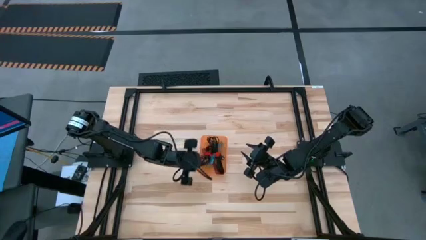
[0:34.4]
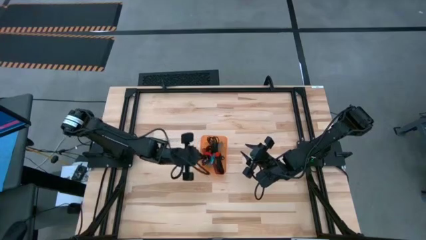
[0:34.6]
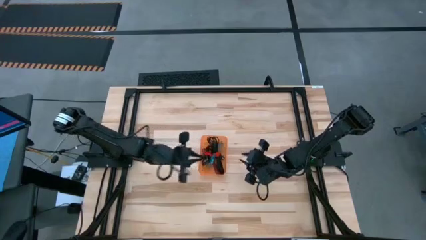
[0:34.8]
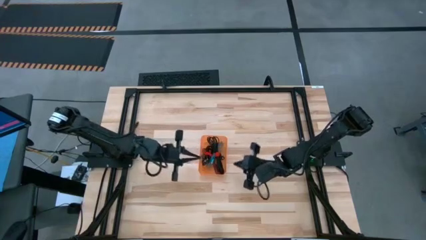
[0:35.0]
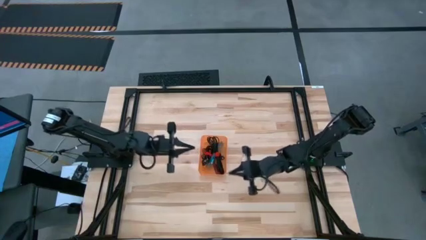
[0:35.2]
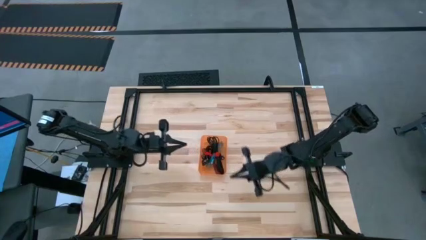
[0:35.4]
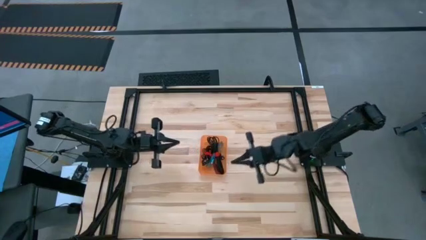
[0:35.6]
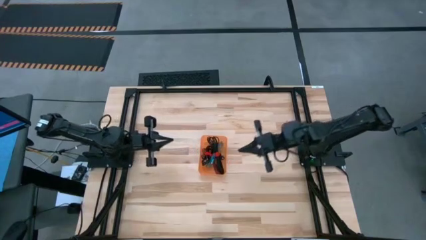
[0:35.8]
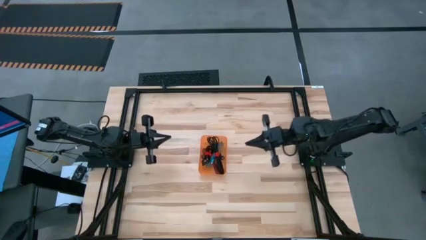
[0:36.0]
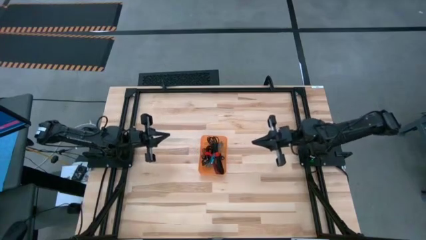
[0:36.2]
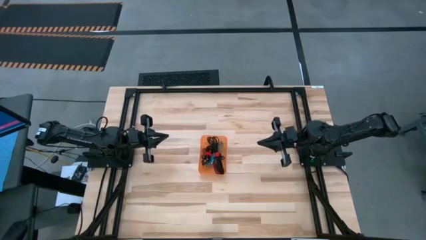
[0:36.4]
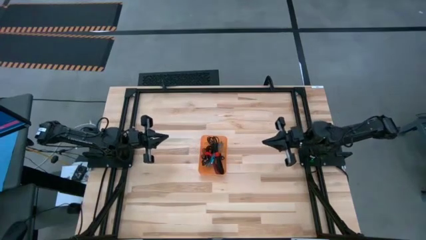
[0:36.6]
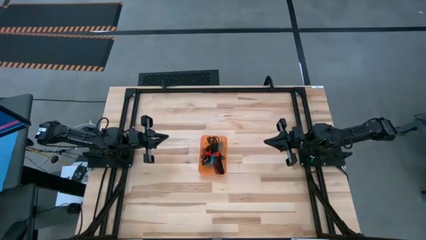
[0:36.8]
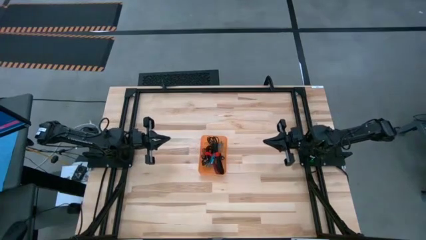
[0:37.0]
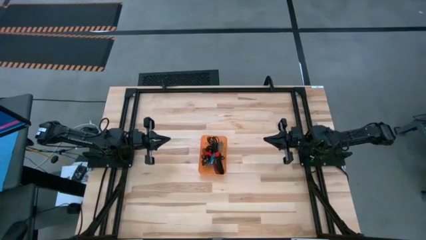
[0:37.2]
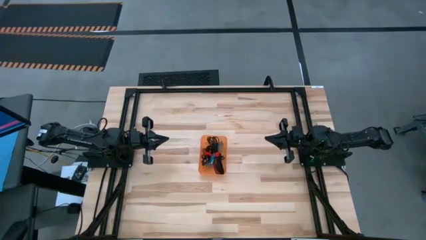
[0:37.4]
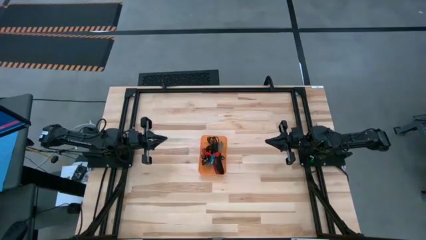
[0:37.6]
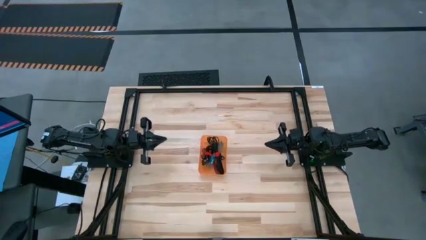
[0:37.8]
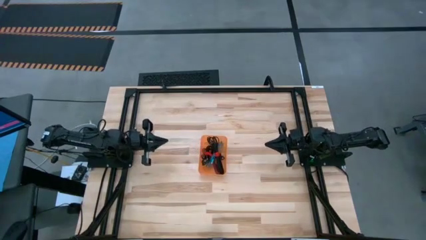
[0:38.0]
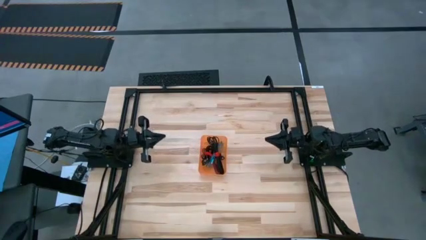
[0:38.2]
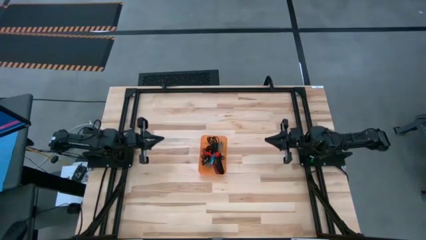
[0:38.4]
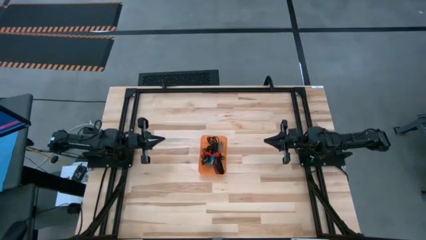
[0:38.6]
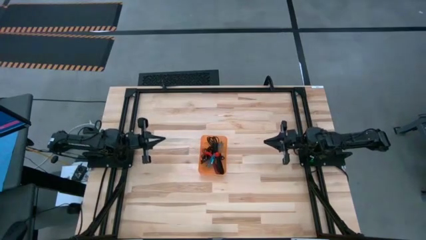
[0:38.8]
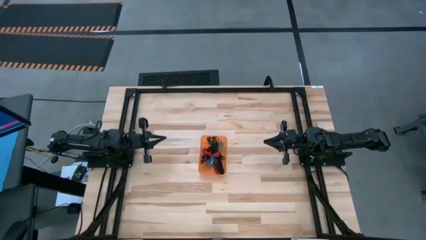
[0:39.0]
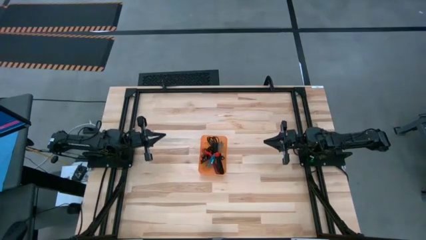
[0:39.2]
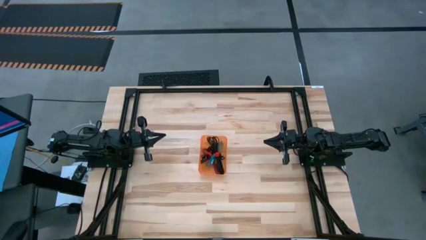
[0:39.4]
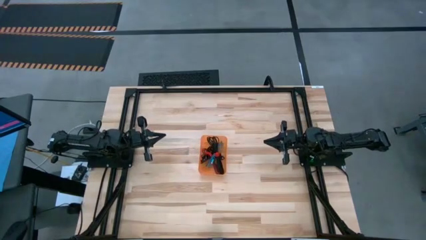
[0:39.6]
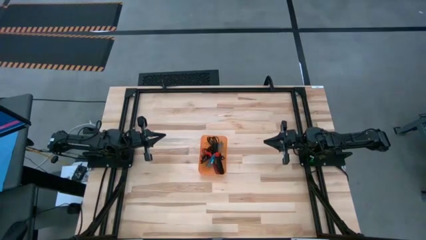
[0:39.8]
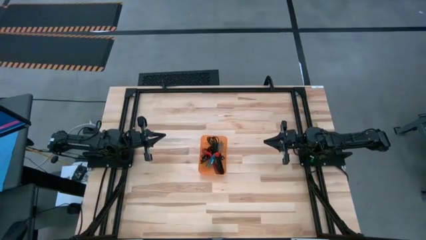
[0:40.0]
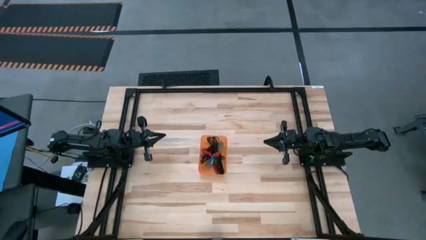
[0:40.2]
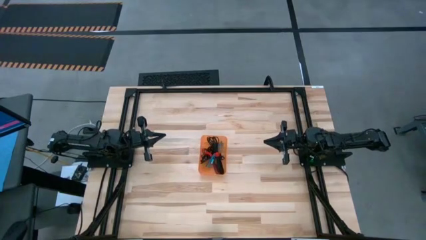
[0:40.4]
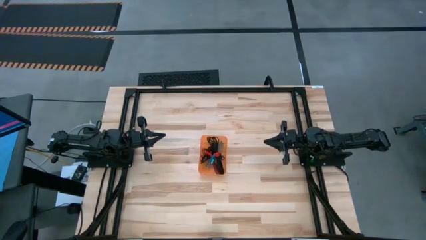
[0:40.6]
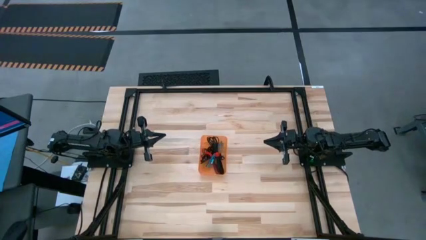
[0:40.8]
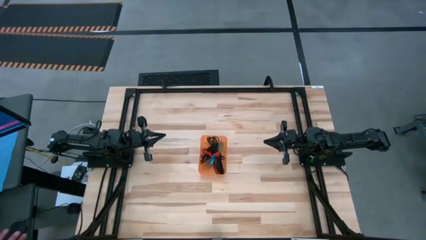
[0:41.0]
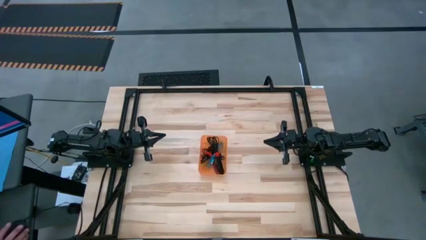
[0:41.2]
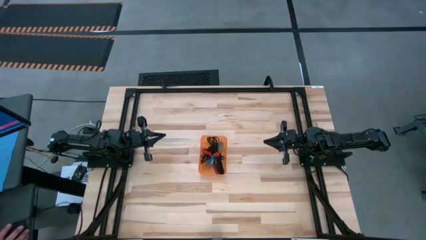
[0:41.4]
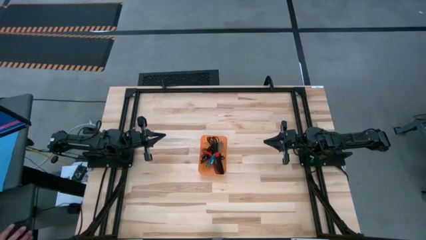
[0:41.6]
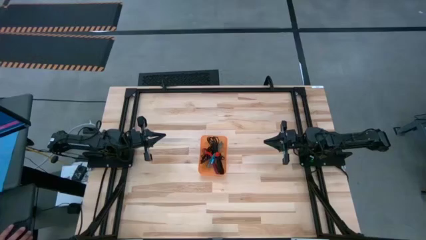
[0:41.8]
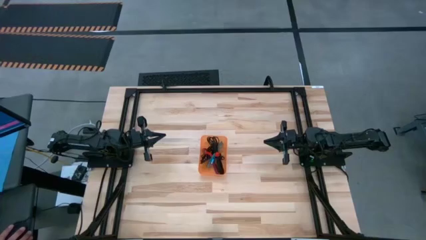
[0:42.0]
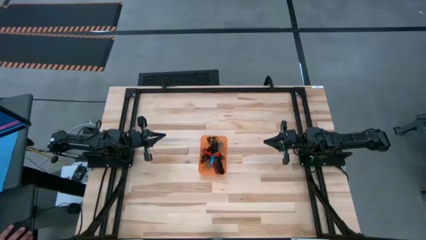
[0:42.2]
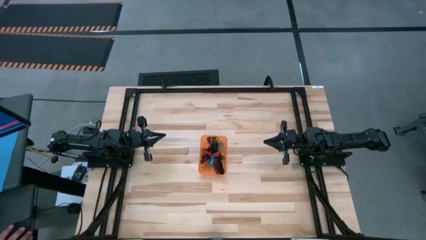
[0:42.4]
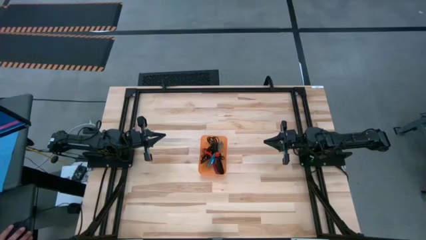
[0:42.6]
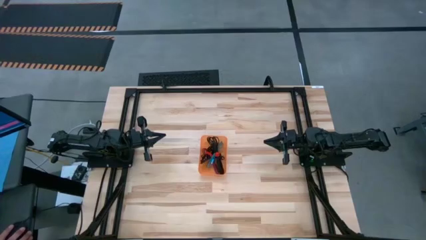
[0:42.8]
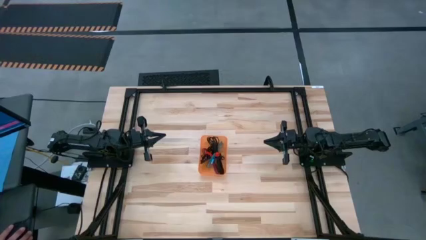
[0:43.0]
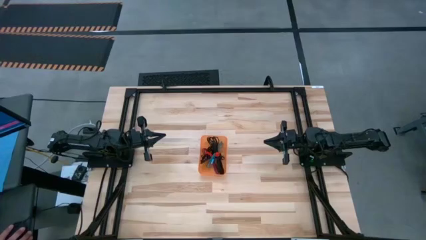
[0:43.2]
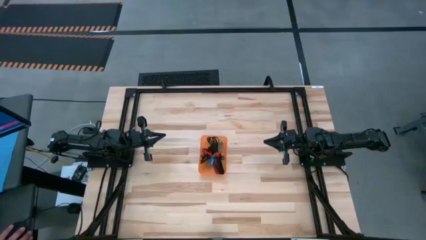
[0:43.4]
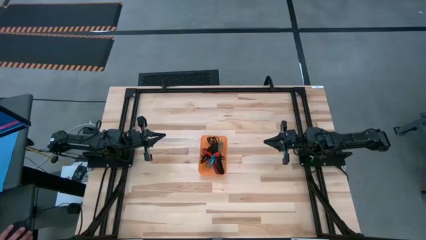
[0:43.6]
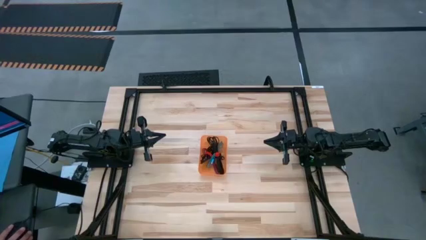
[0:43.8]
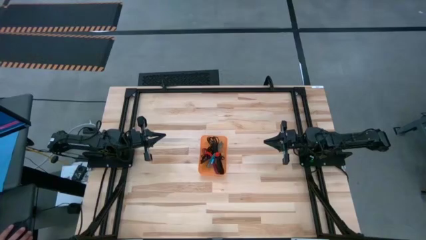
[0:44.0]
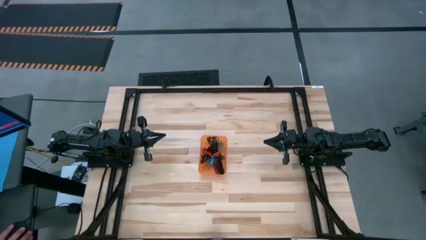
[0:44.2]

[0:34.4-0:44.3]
Task: Pick and place USB-C Cables
Return to Home Position

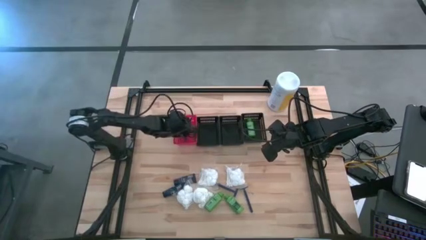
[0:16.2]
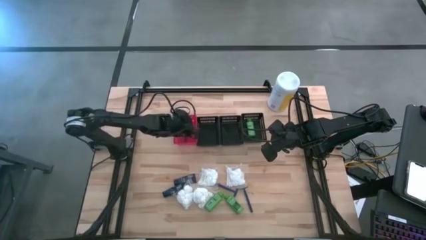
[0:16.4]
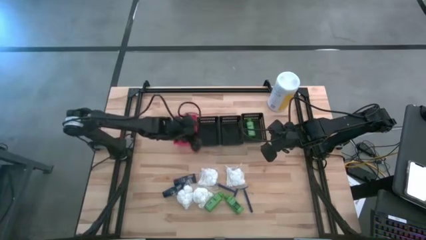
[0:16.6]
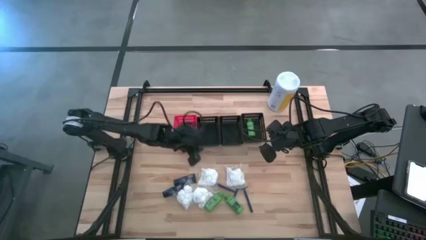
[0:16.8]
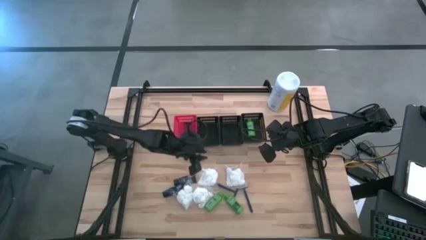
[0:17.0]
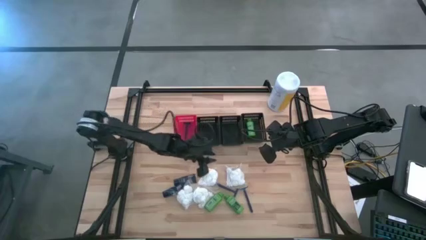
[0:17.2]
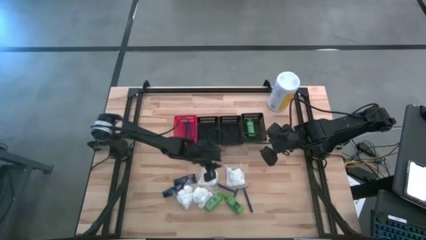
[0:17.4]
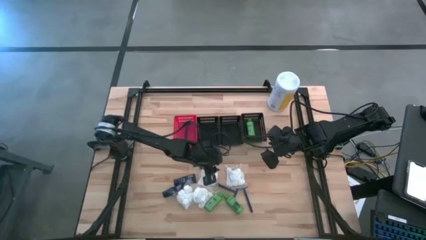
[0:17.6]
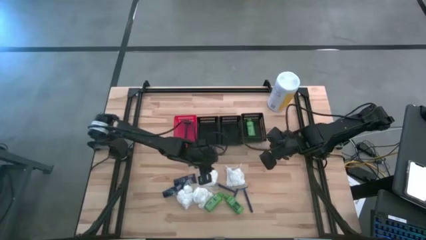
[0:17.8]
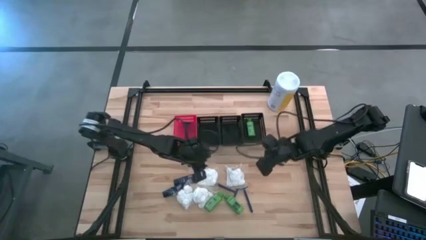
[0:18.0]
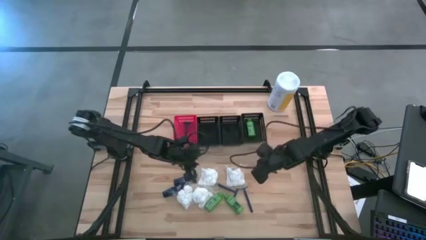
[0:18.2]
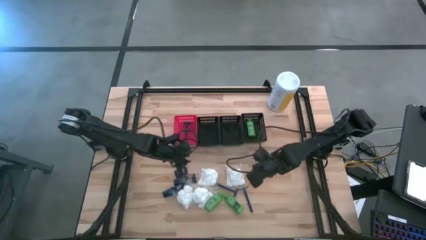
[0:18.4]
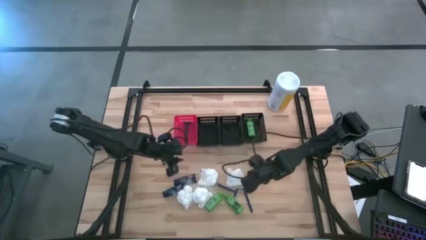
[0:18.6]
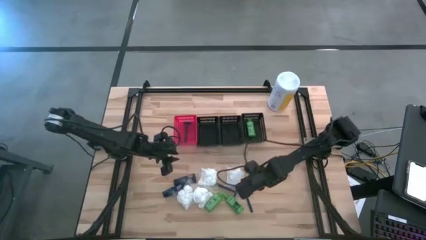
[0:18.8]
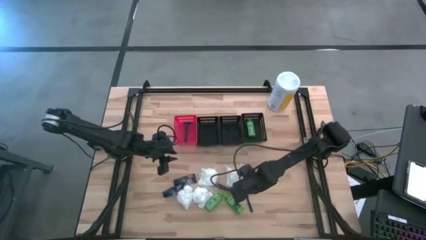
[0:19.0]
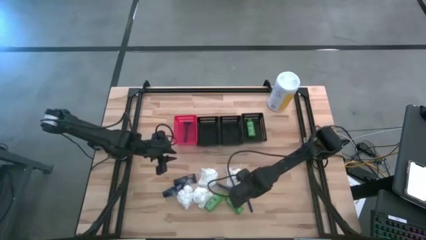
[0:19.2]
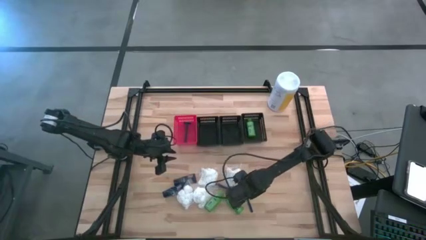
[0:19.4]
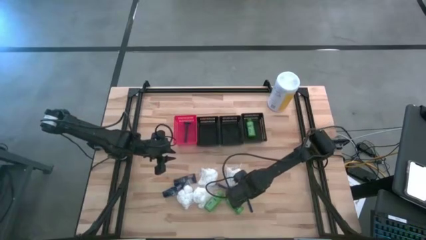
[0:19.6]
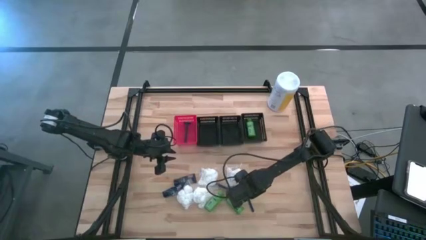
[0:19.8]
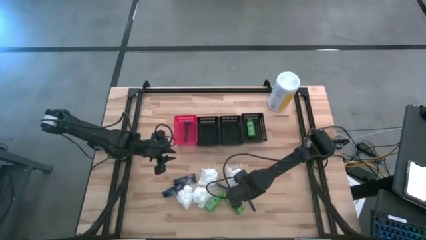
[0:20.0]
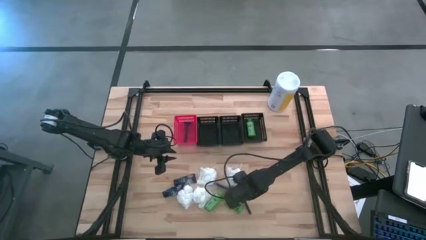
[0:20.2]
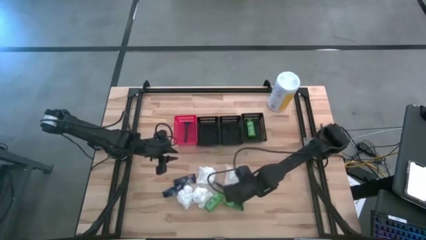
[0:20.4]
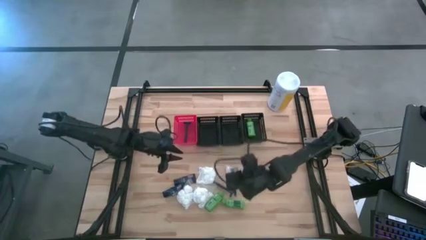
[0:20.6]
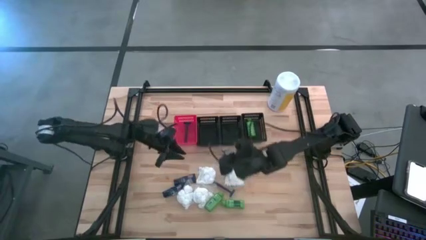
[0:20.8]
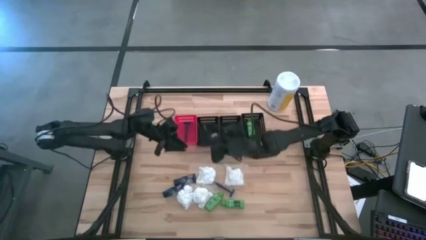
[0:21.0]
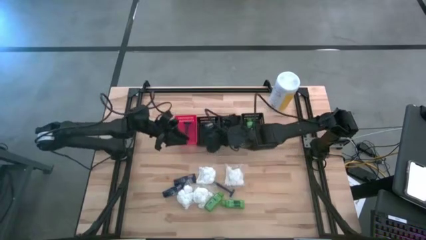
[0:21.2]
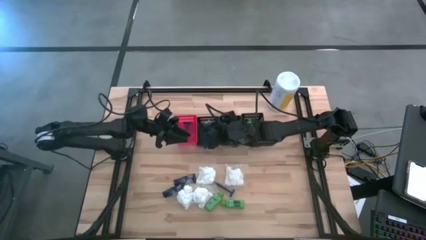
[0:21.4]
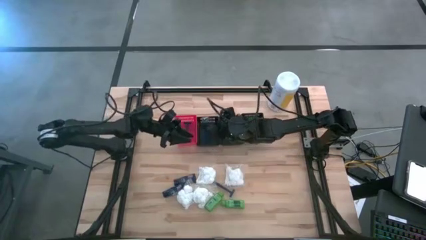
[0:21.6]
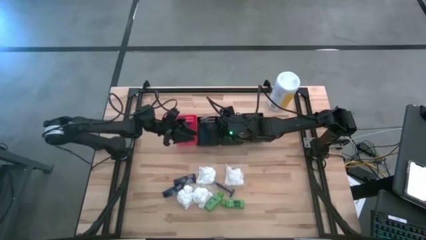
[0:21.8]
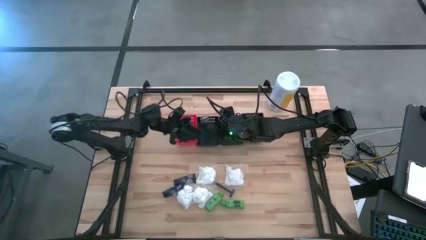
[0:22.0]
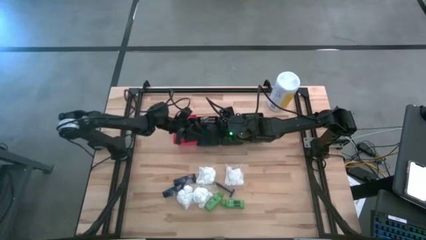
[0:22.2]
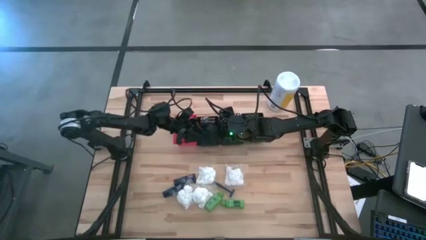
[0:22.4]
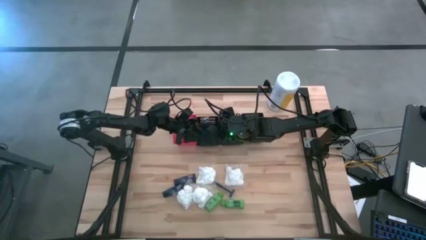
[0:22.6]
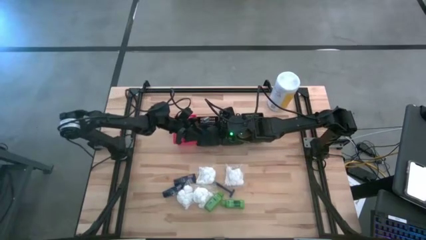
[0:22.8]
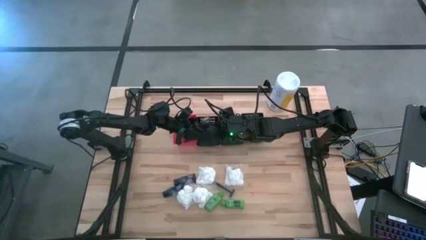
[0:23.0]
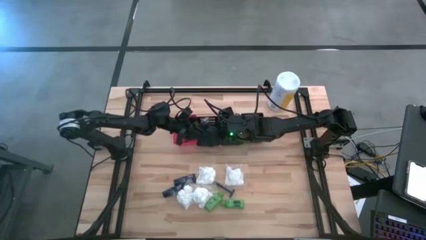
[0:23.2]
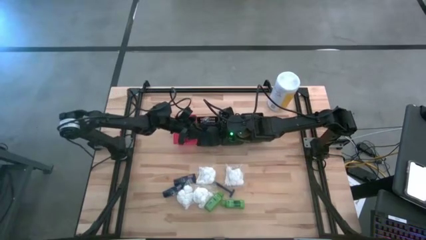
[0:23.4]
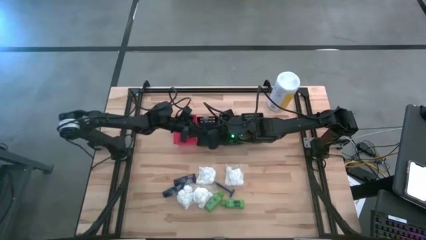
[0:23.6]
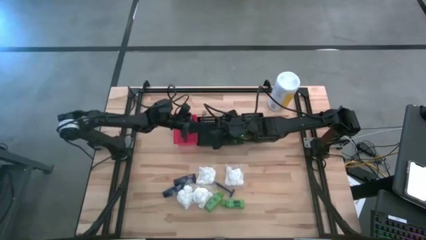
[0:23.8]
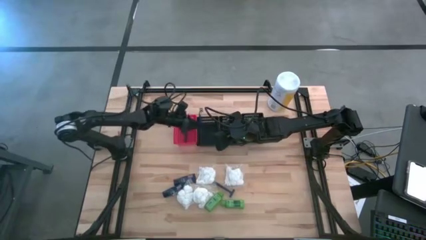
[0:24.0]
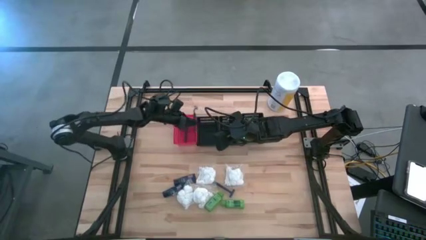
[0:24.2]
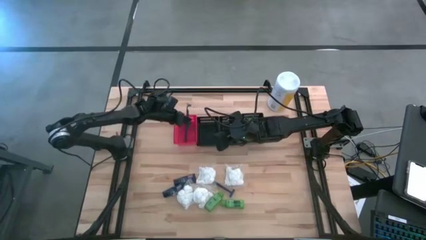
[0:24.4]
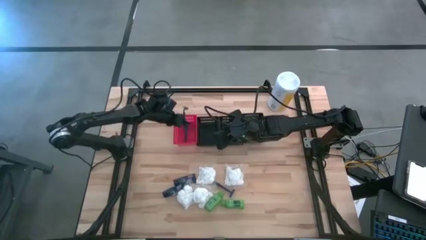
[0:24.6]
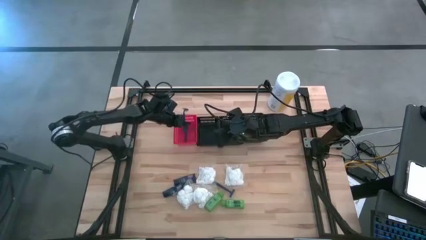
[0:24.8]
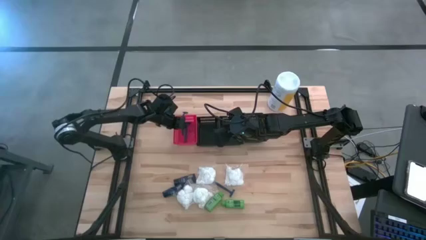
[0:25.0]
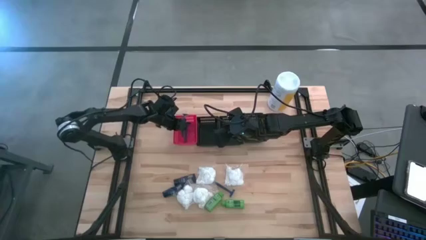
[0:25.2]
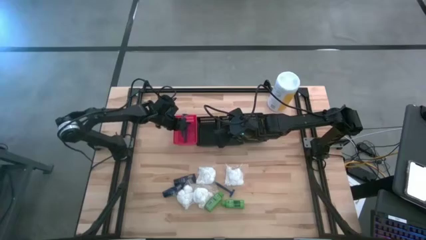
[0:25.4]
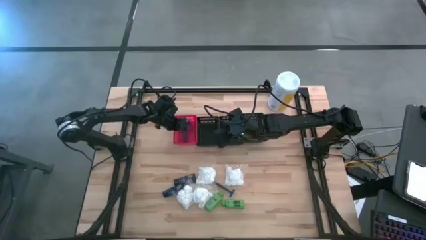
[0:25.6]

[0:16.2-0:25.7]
Task: Pick & Place Travel size toiletries
Put the razor into the red bin
